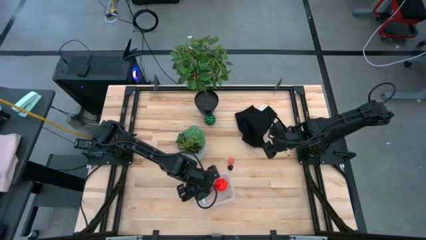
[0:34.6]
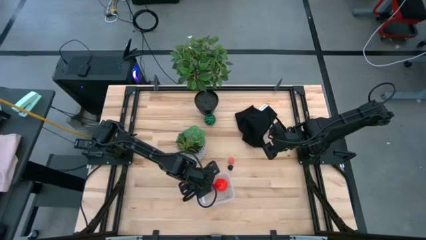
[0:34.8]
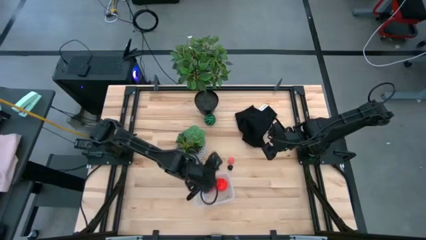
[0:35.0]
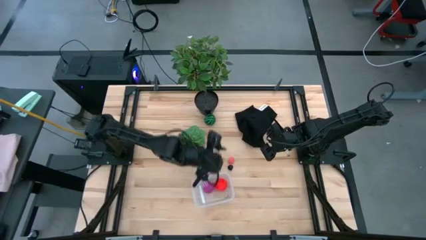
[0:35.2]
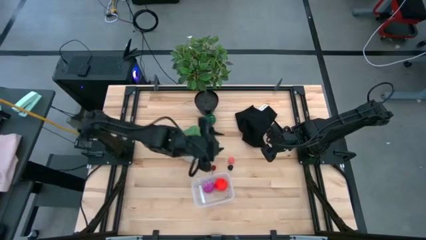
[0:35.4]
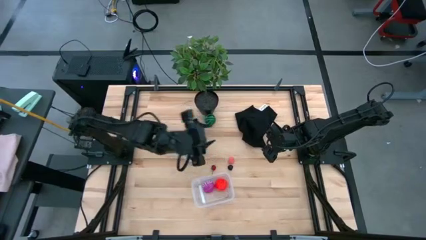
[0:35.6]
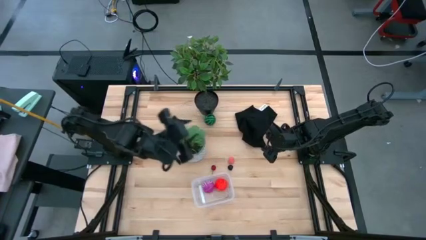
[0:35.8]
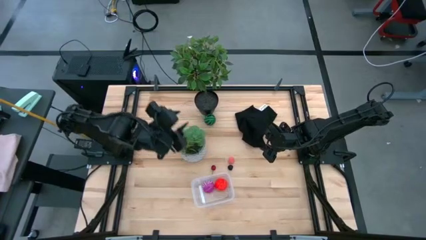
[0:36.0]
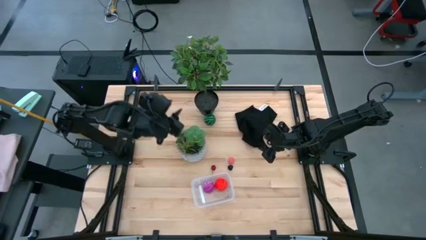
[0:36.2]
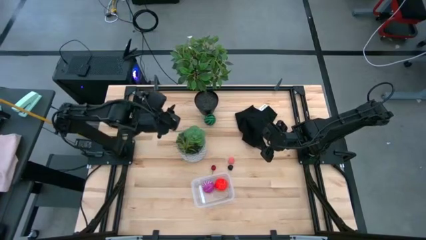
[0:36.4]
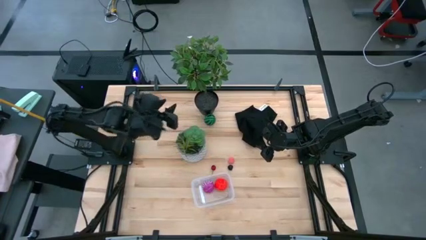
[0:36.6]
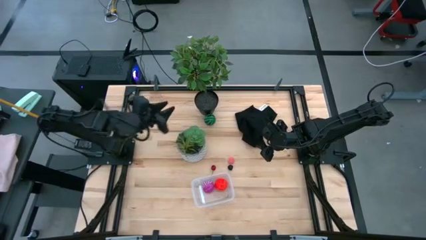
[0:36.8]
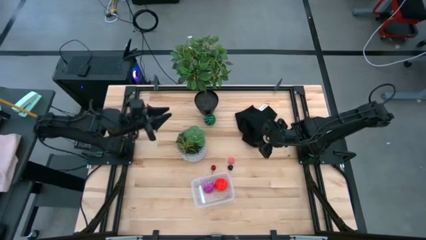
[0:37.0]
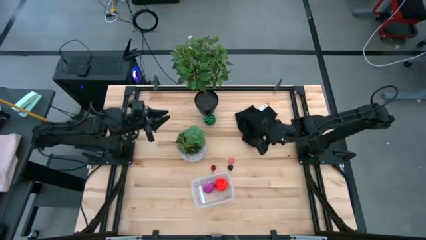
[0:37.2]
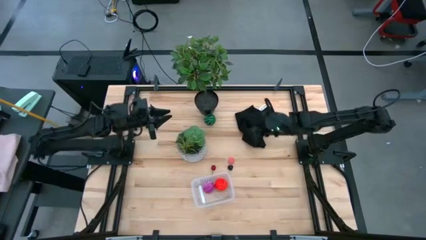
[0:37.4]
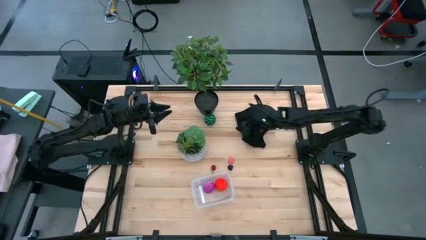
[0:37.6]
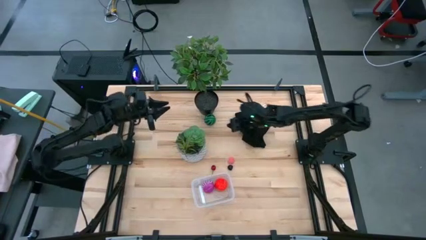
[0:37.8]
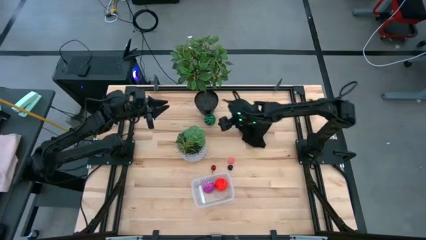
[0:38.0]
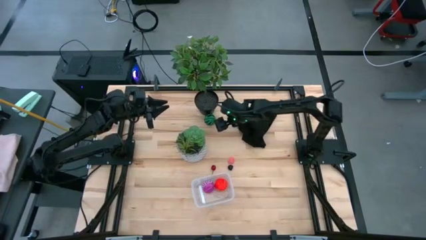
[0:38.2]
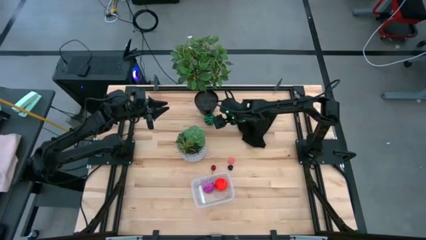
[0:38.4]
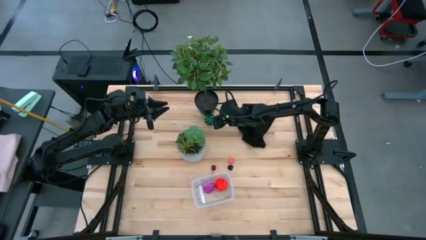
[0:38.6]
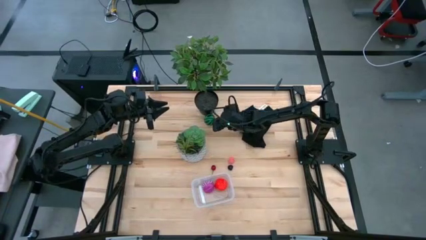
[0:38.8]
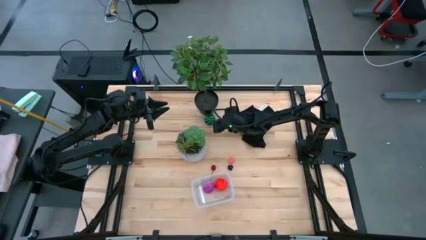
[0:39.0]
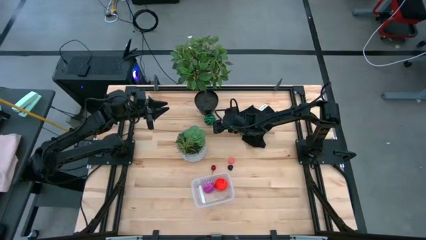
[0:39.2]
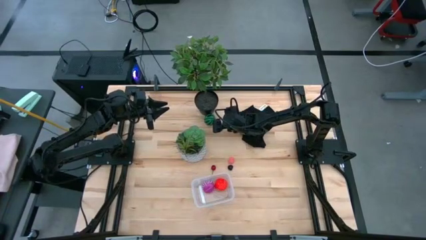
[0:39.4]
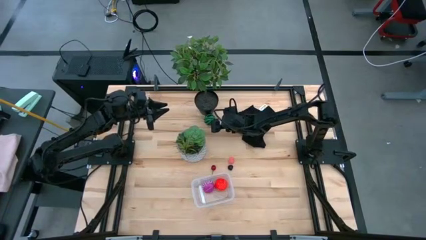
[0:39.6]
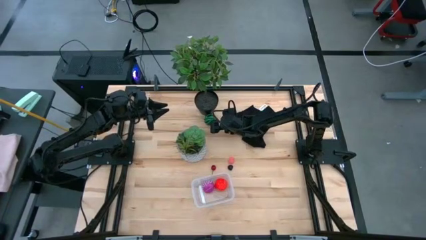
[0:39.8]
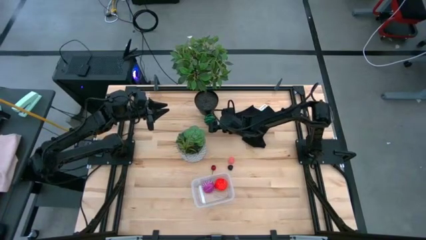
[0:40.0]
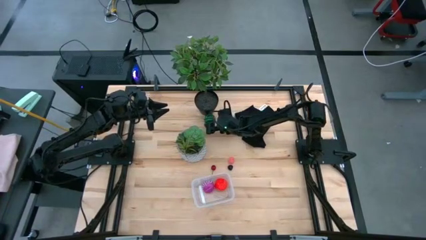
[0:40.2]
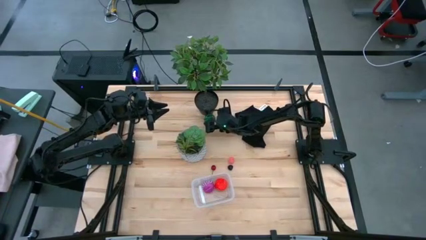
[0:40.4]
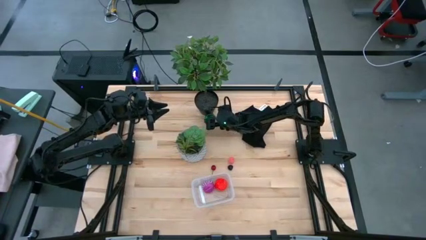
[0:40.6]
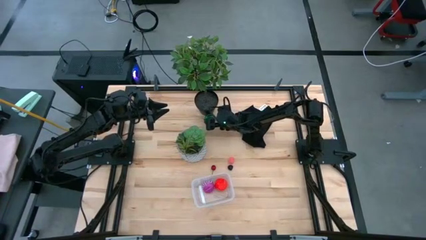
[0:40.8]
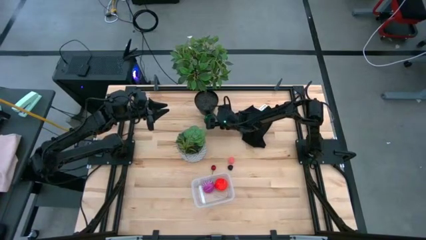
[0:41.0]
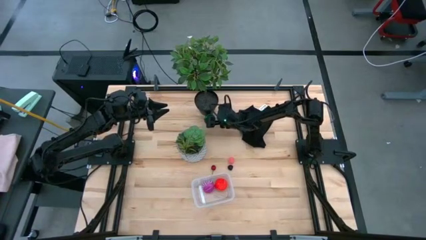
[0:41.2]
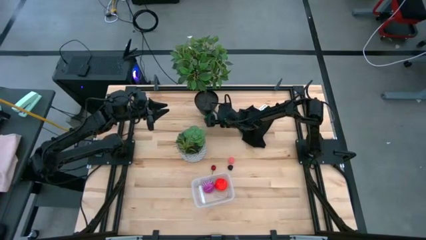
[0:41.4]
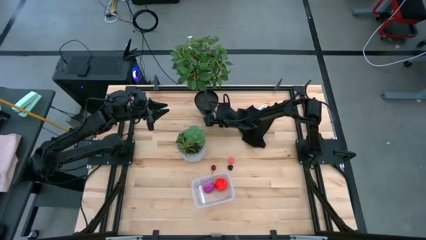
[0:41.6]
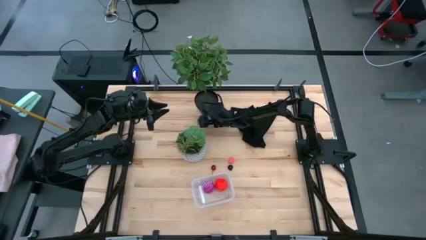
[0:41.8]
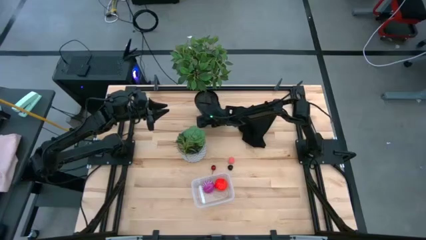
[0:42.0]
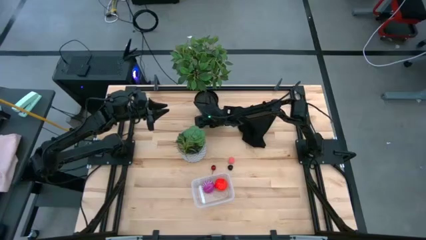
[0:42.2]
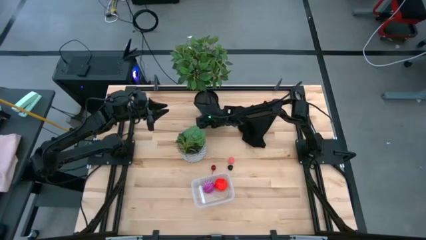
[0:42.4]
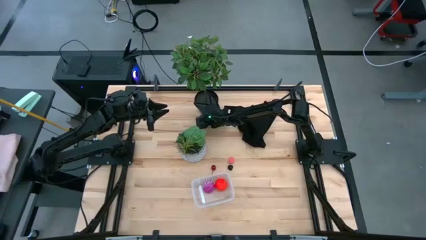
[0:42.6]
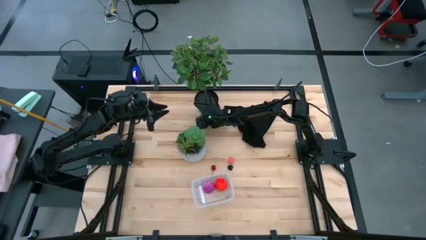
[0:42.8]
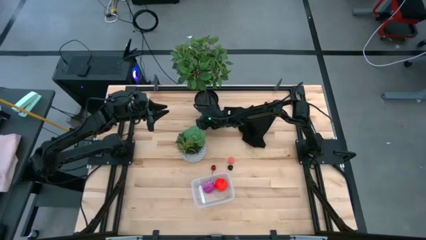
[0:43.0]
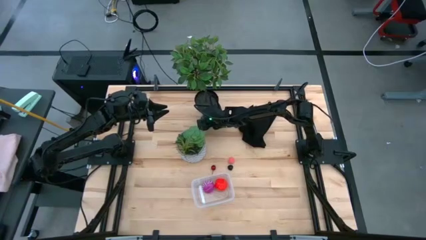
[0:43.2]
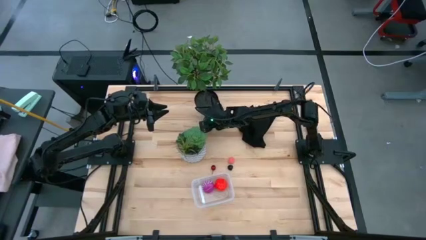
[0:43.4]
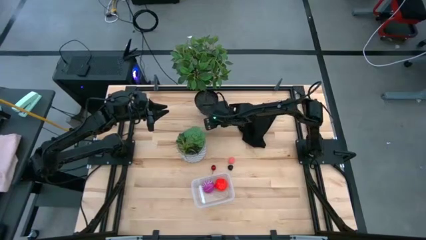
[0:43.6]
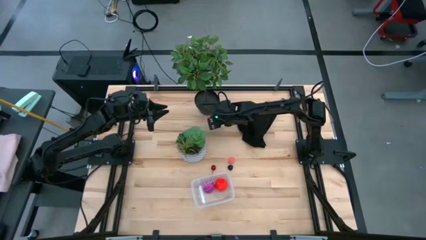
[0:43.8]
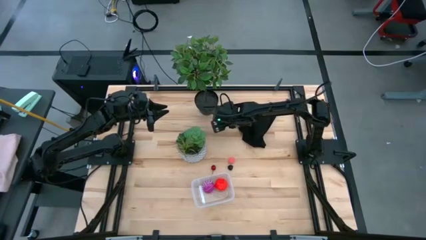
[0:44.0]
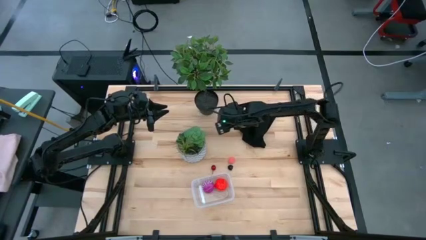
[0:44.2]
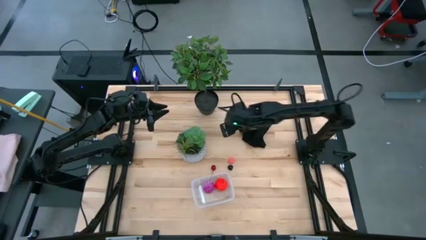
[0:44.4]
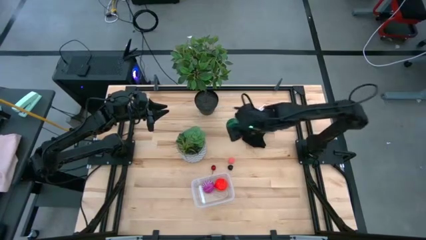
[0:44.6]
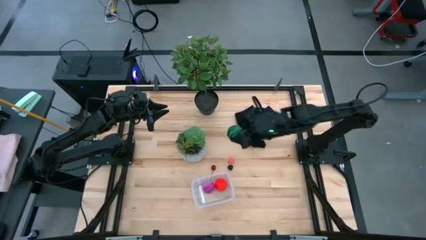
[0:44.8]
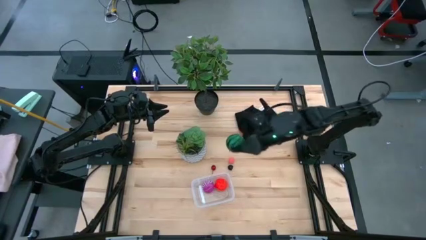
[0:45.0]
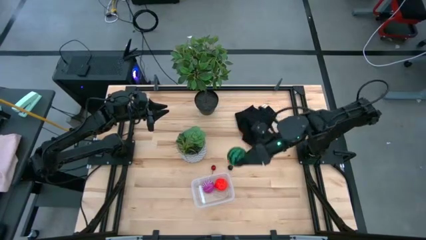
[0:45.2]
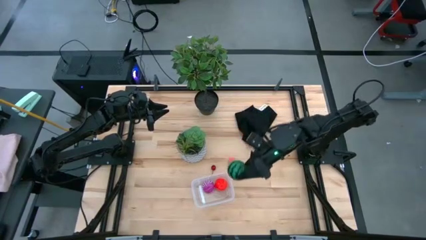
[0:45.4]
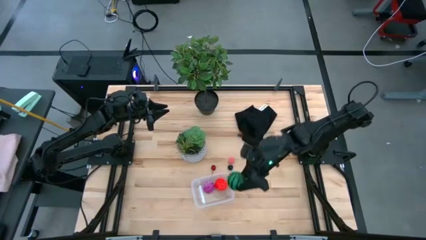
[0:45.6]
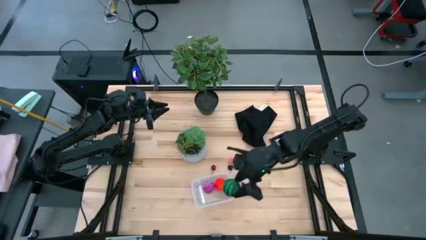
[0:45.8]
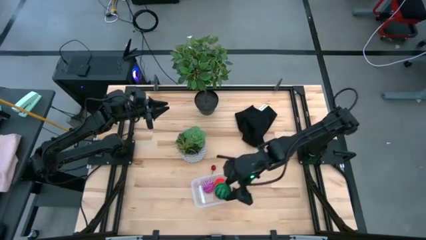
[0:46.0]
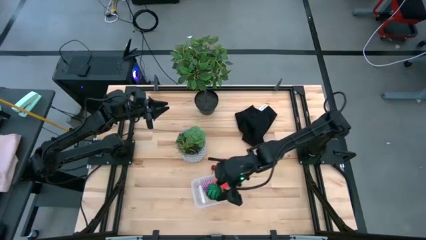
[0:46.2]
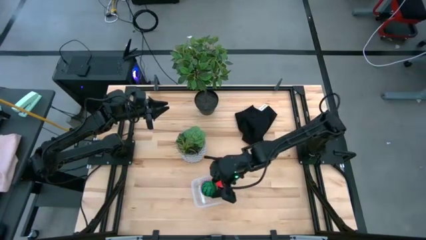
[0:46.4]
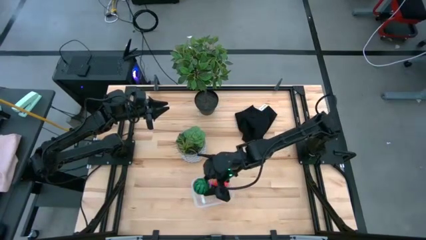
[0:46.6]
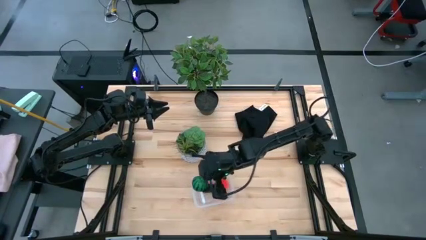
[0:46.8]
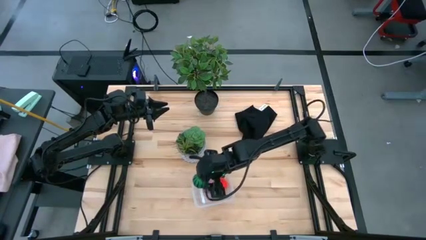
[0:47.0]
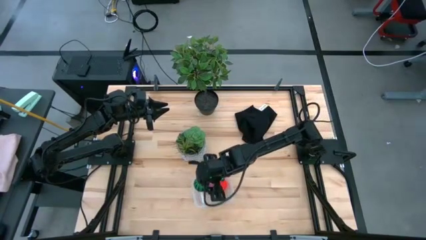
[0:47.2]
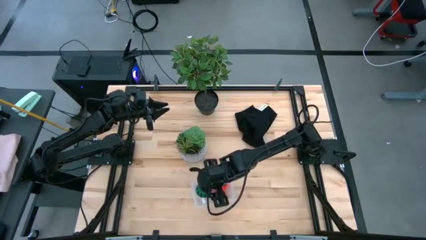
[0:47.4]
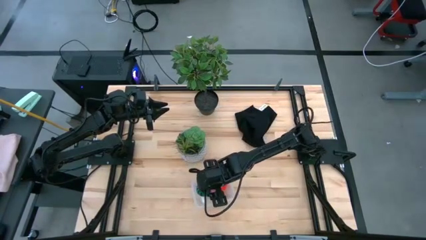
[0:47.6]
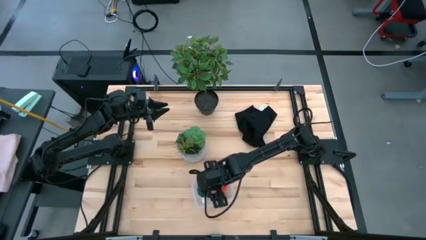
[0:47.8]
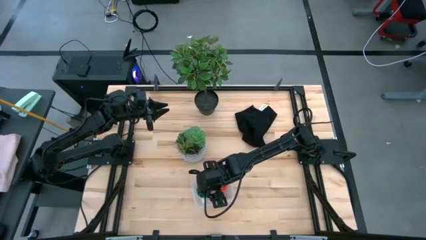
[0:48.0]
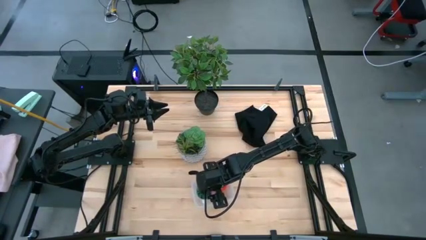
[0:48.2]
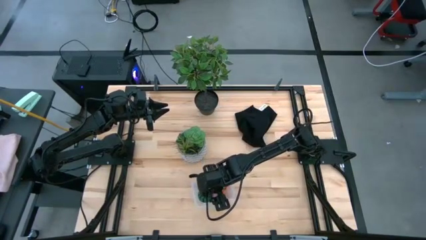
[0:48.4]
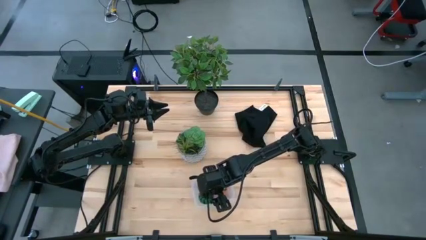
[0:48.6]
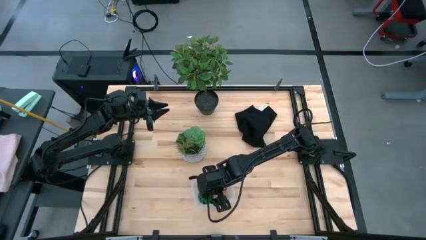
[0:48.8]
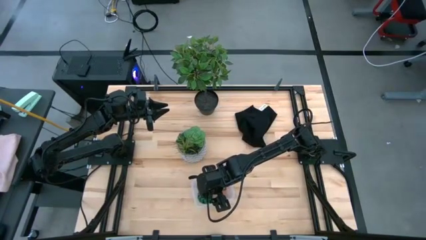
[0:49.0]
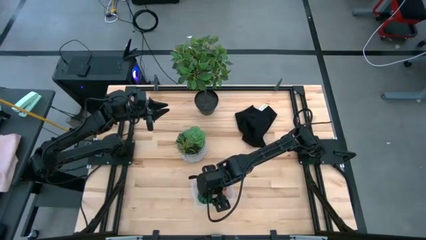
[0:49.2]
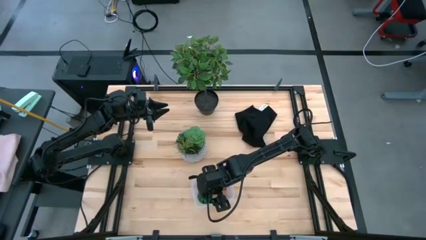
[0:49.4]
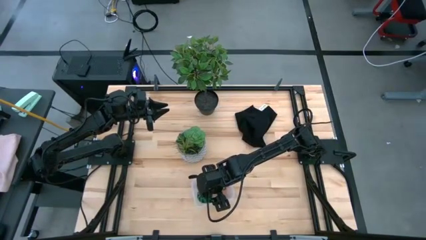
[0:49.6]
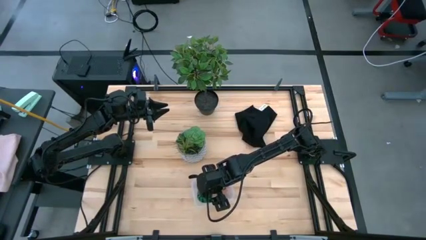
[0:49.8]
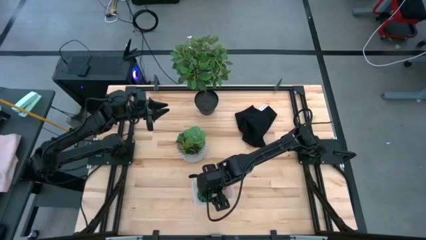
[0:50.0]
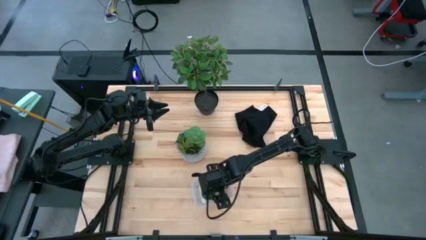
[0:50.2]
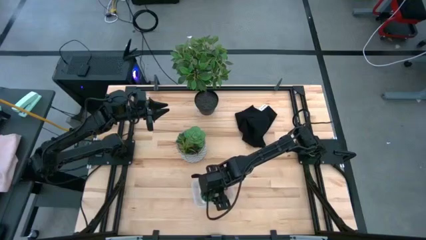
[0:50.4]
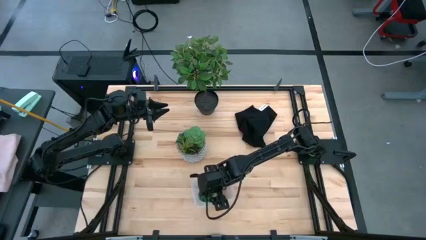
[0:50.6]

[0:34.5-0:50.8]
Task: Pick and placing Produce into tupperware
Put the watermelon into the transparent bin
